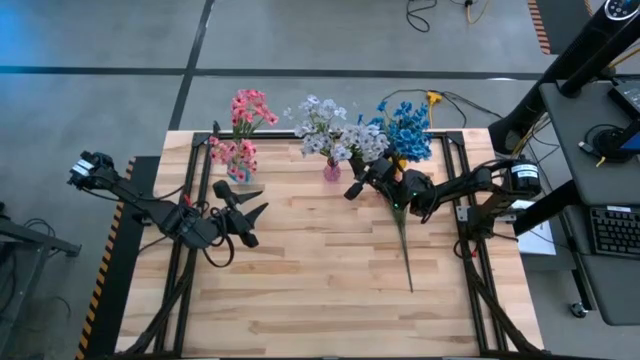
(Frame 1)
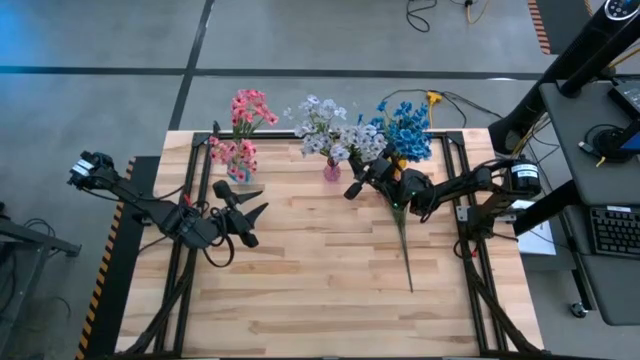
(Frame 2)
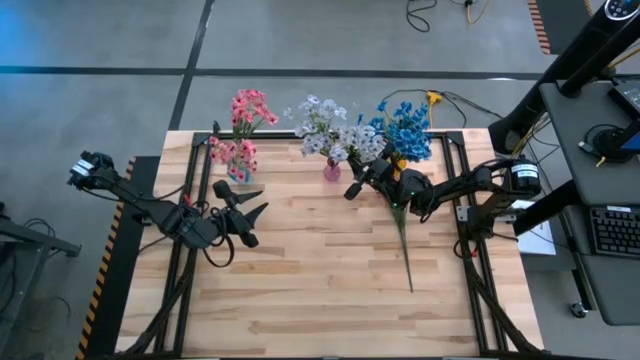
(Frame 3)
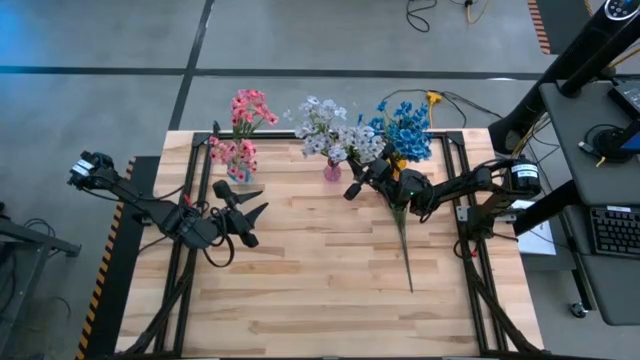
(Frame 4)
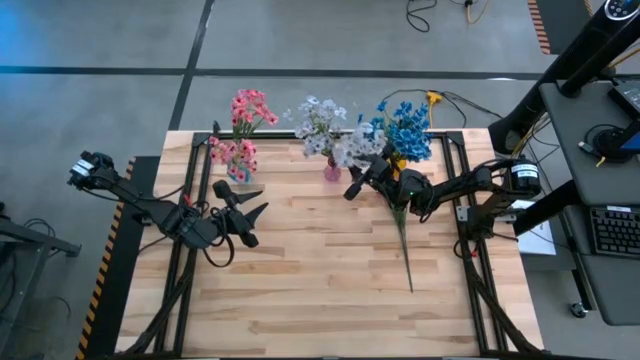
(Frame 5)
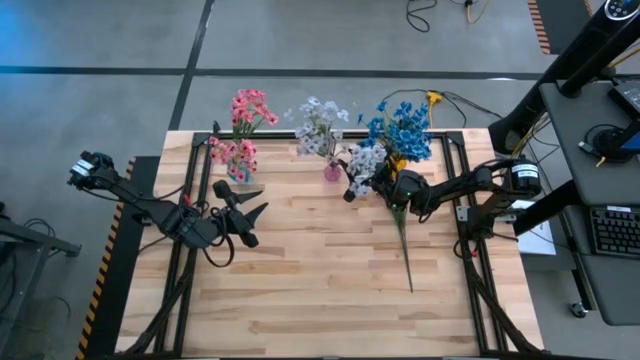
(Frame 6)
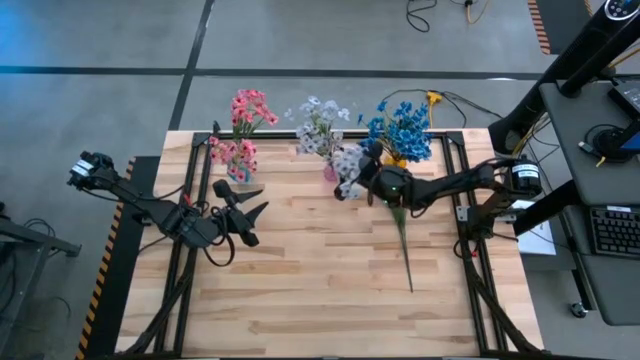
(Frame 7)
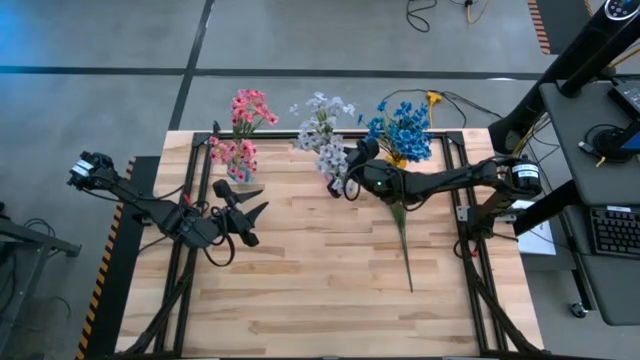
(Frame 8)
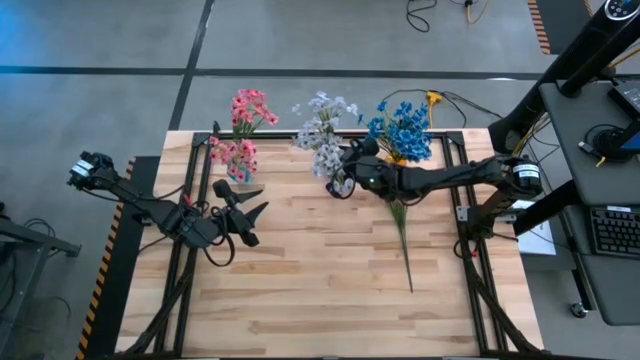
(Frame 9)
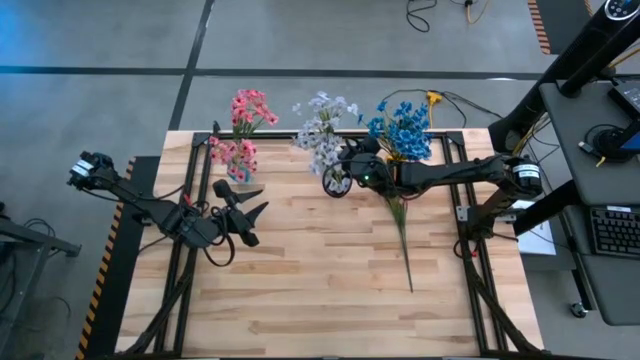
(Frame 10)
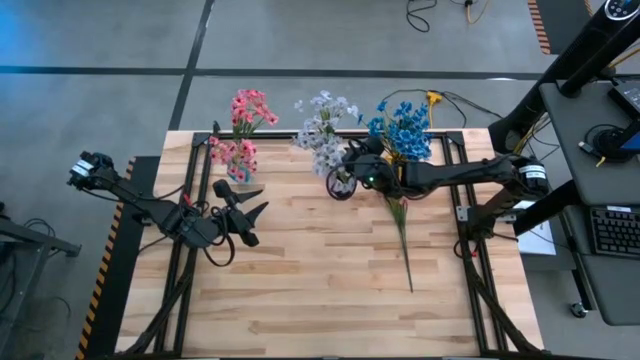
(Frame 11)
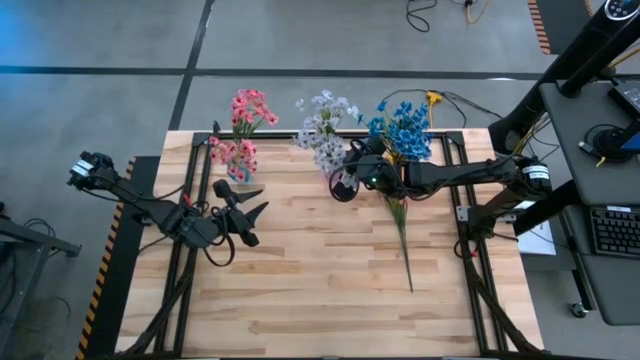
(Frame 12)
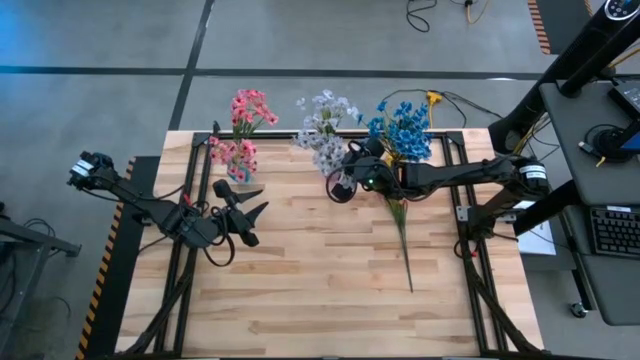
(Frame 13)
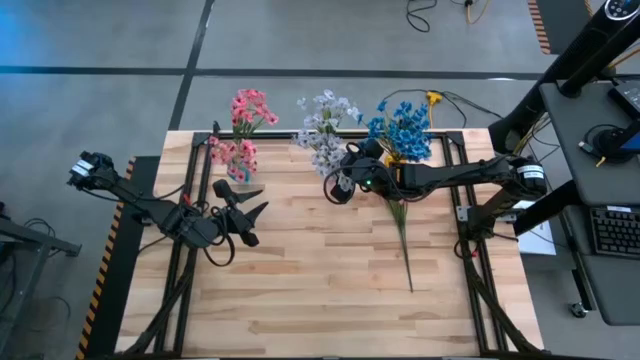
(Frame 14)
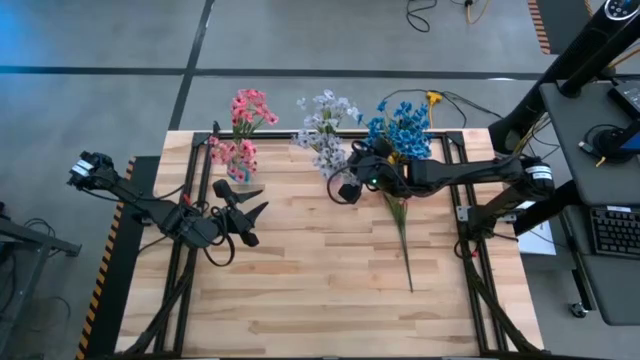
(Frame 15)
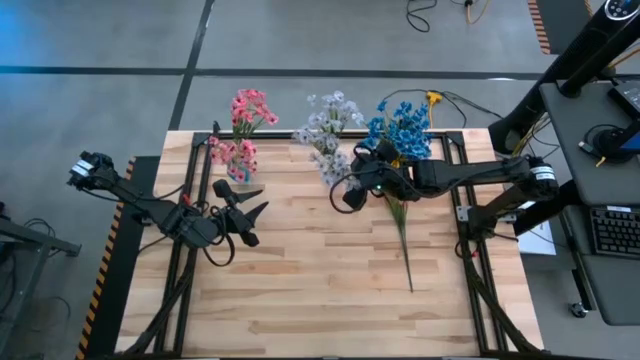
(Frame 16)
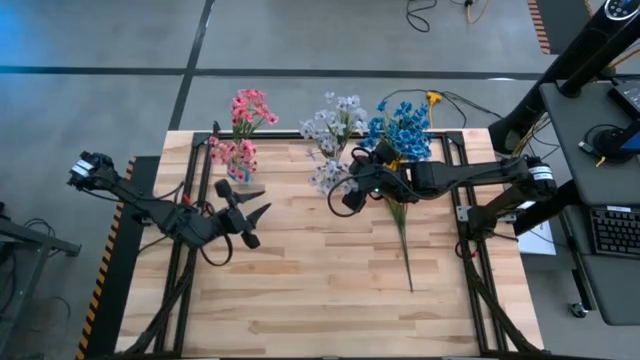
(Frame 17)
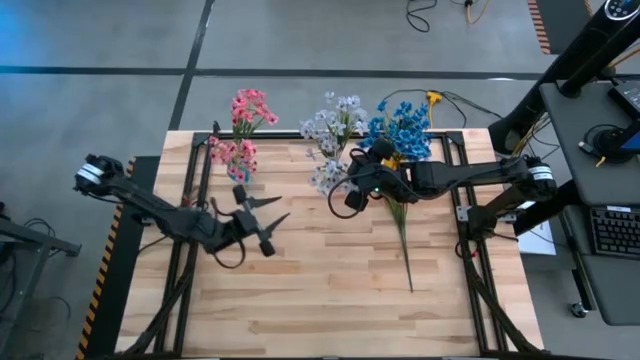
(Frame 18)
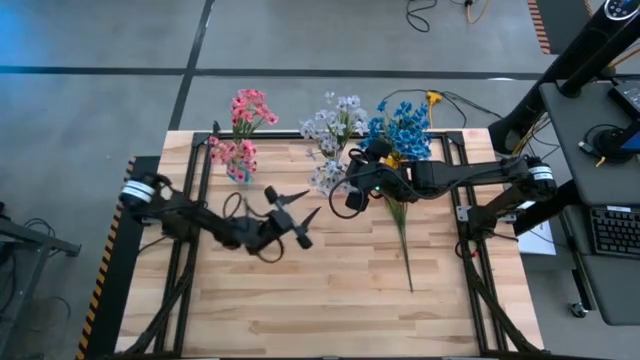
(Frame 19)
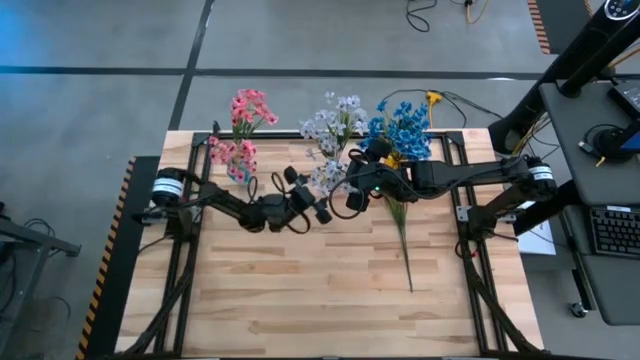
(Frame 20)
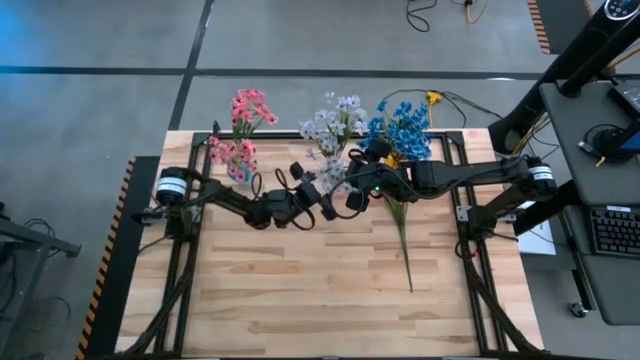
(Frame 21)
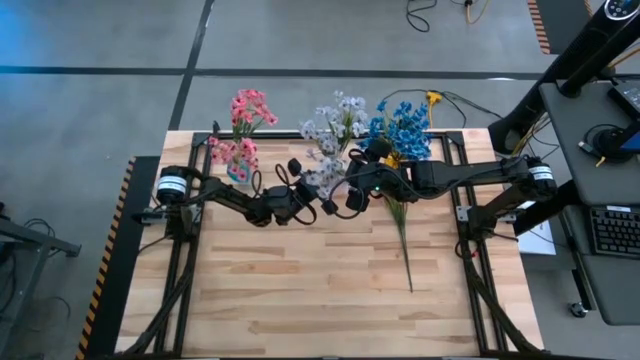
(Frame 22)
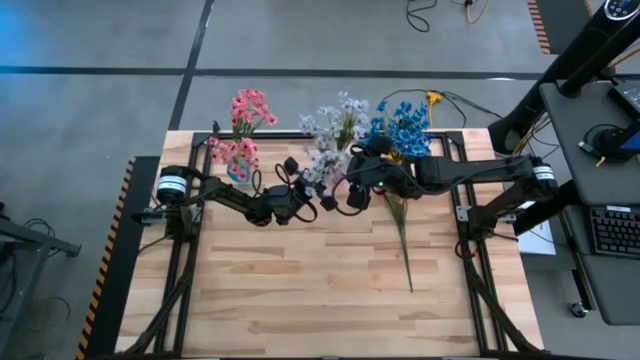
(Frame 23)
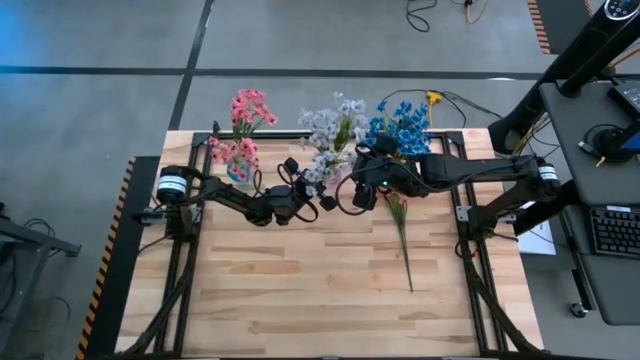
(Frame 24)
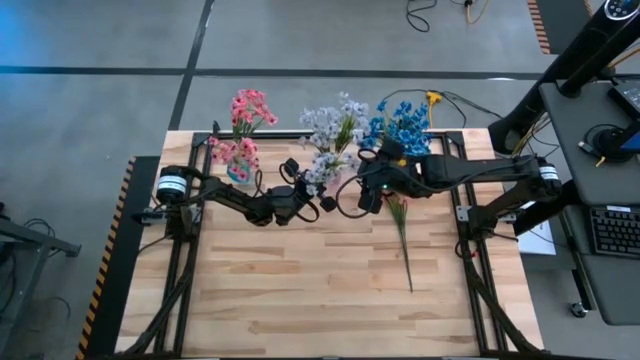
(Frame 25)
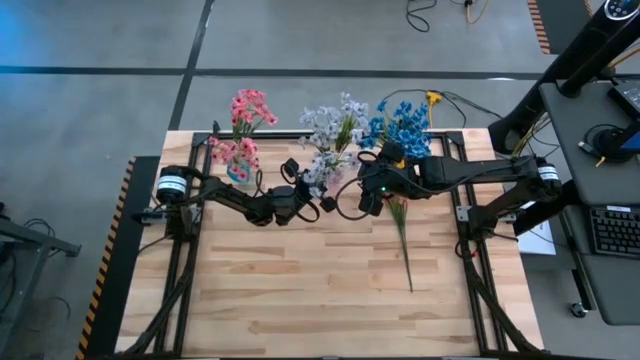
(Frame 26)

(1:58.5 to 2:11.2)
Task: Sort flowers into vase by color
Put the white flowers into the pink vase

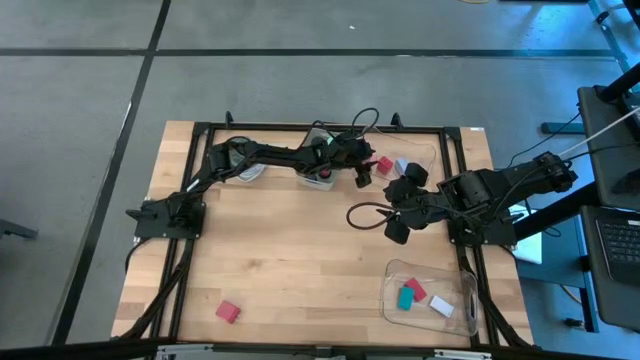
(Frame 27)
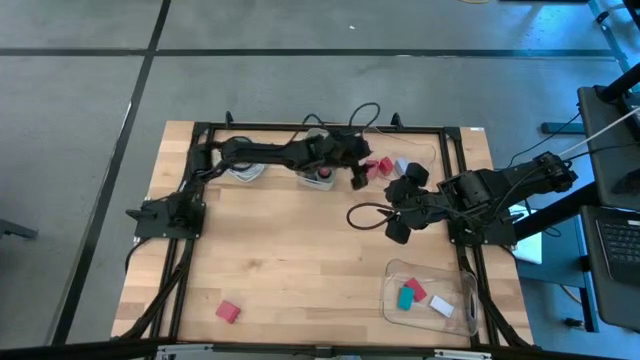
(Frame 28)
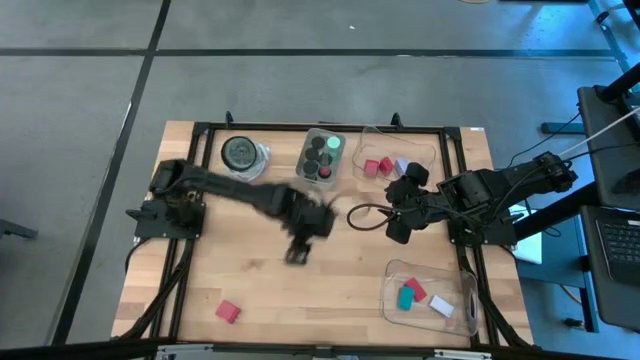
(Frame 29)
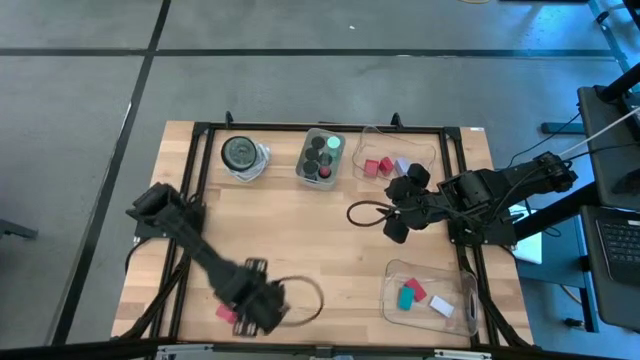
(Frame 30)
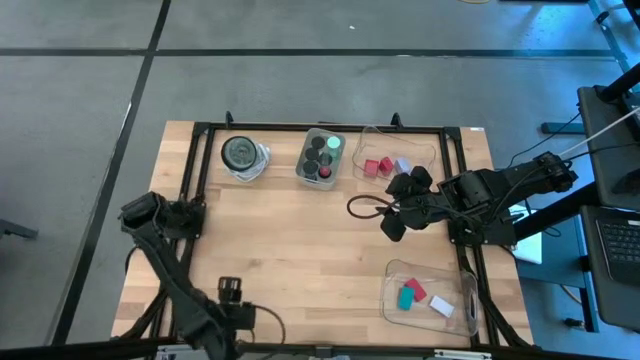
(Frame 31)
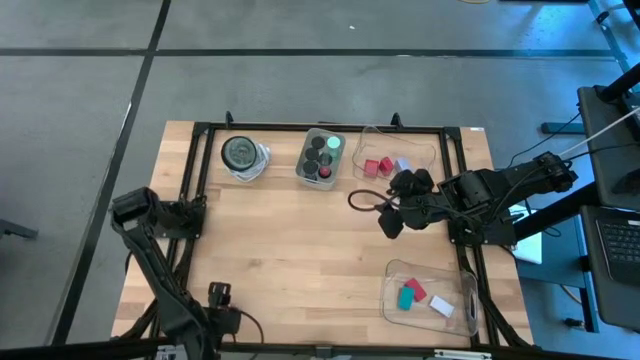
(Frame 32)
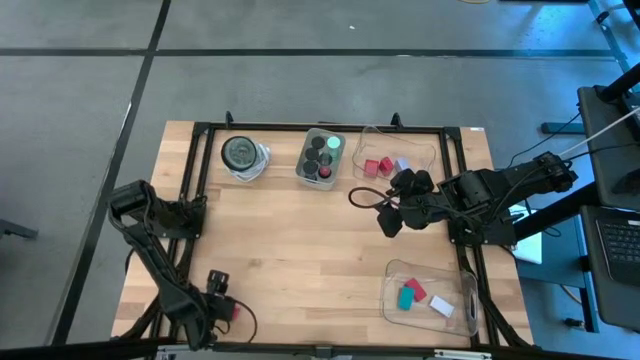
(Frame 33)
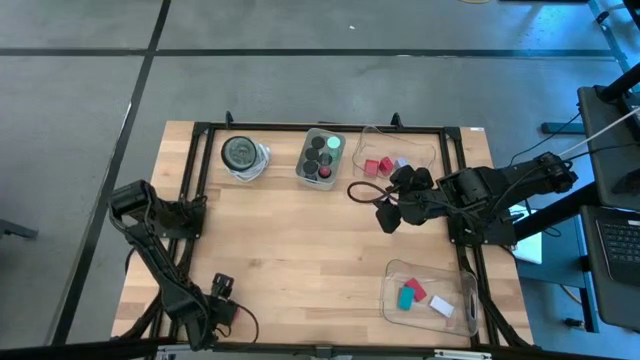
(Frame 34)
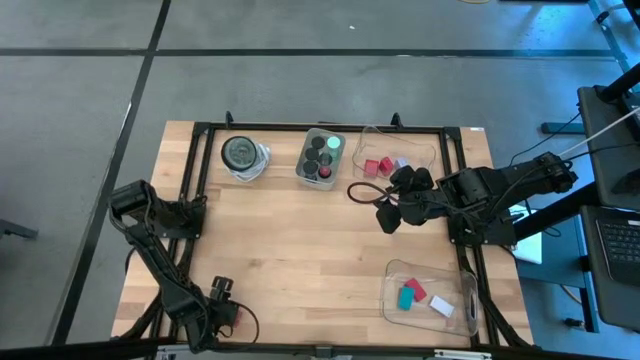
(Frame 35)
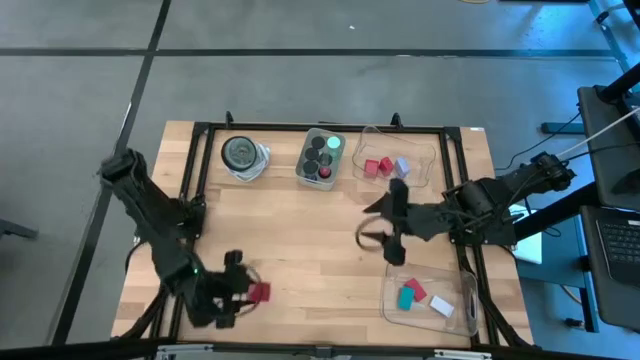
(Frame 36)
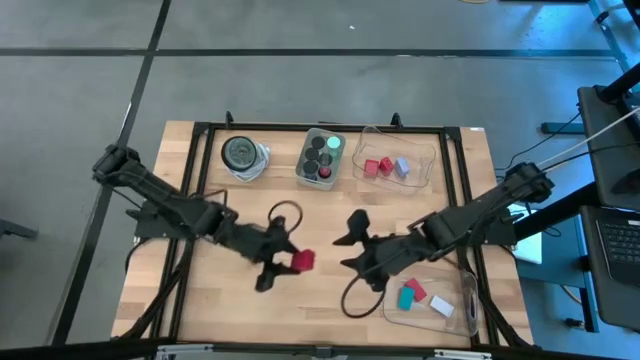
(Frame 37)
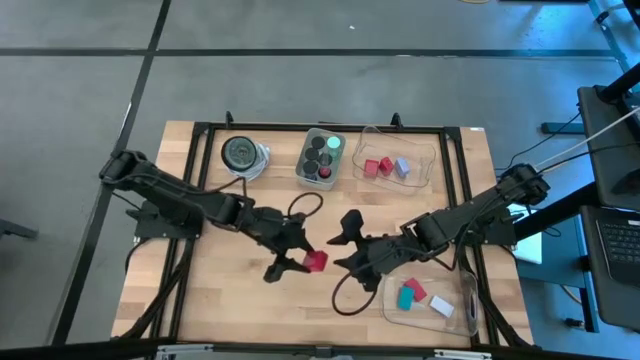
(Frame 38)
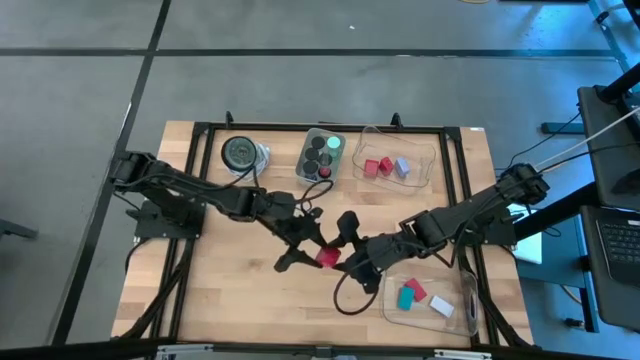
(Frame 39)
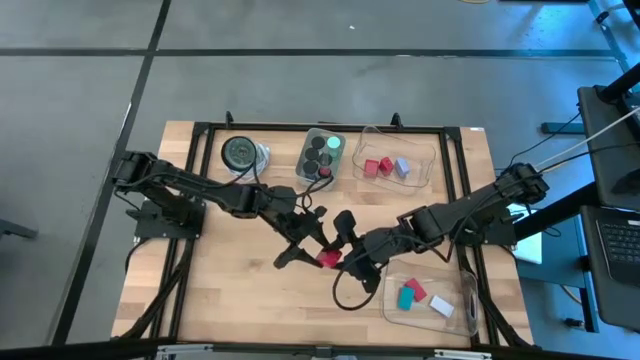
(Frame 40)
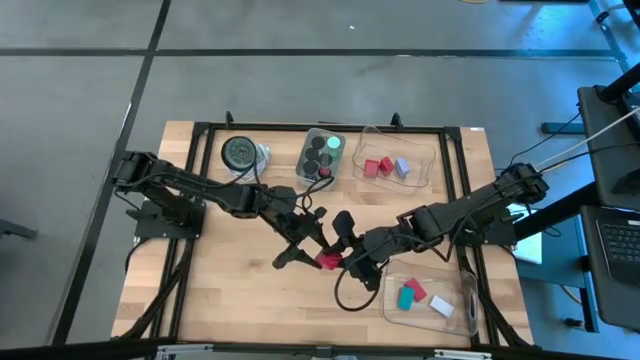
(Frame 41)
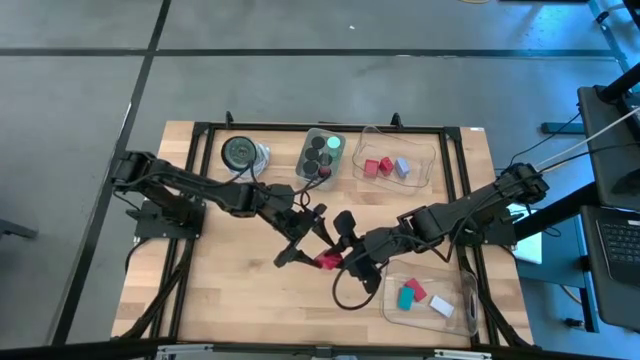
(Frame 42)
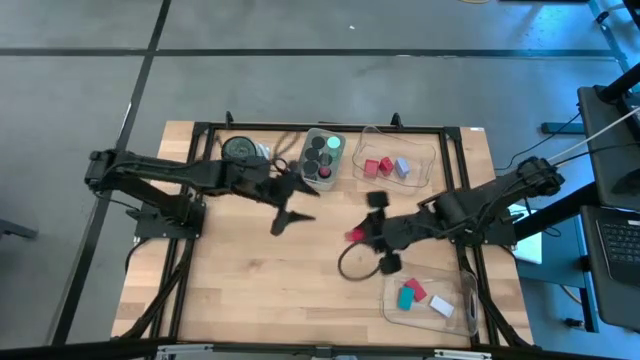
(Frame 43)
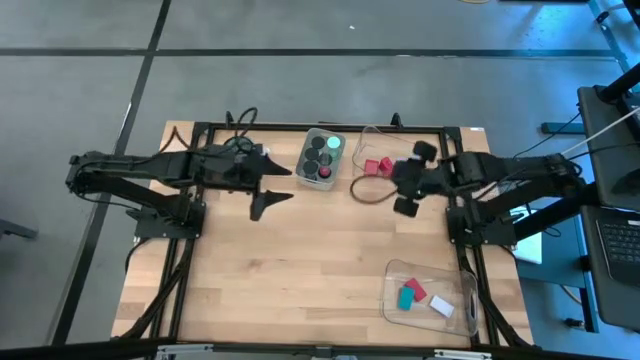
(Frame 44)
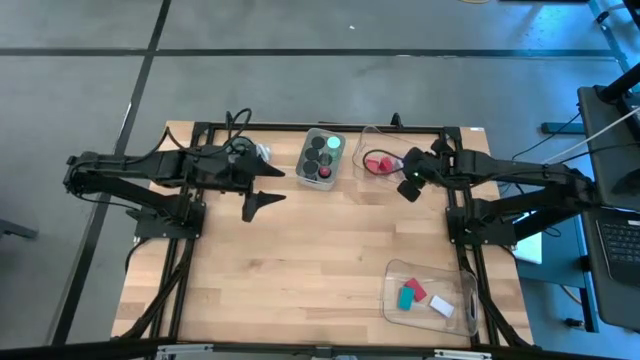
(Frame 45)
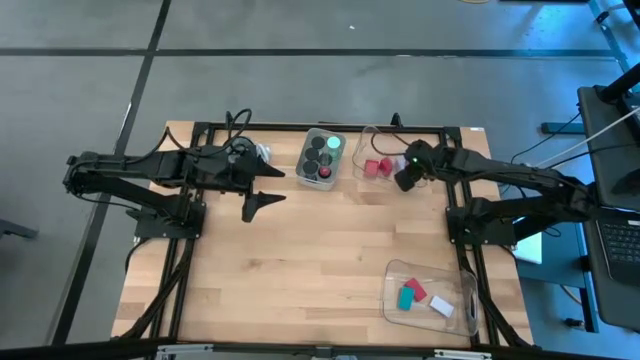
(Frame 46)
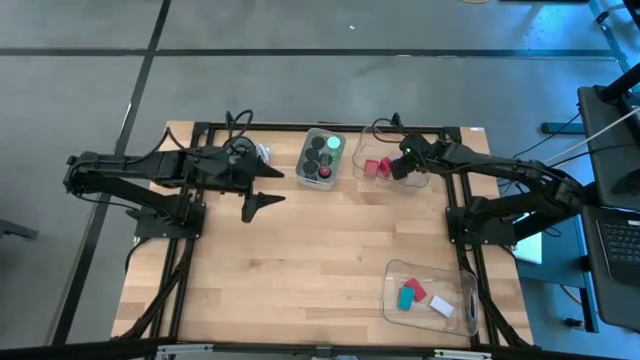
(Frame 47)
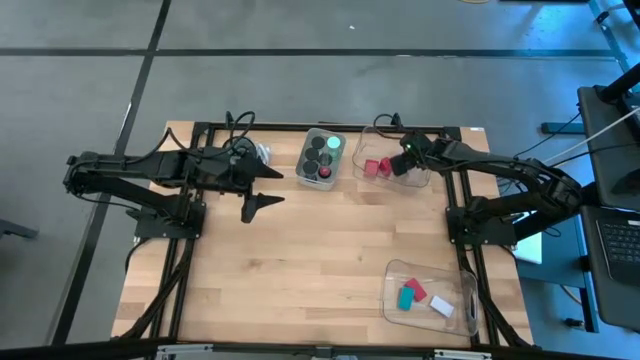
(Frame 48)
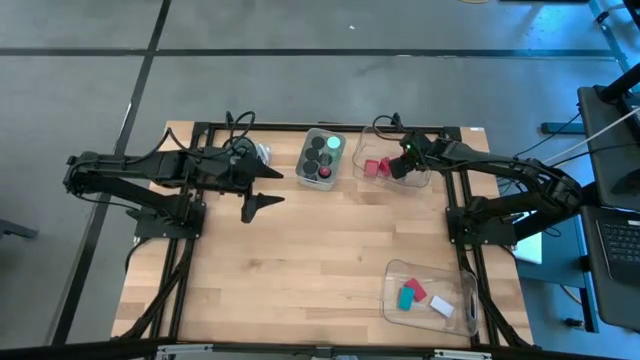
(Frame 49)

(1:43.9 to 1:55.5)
Task: Pick & Place Office items
Put the red charger adapter into the top transparent bin
